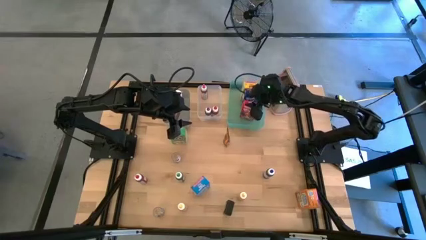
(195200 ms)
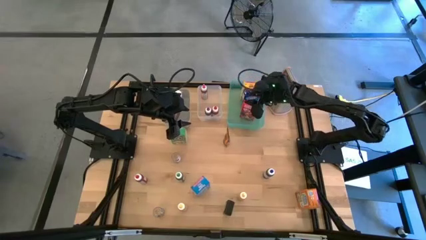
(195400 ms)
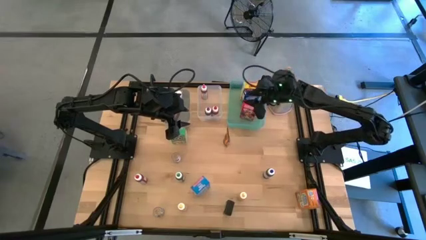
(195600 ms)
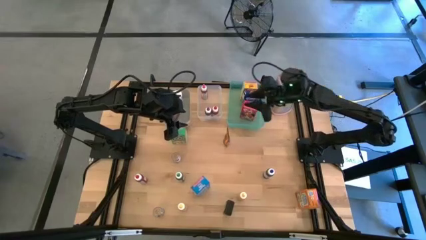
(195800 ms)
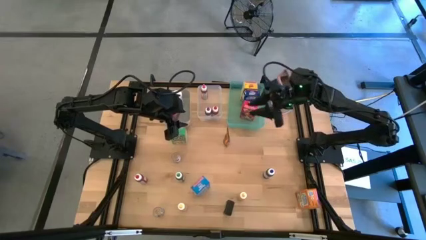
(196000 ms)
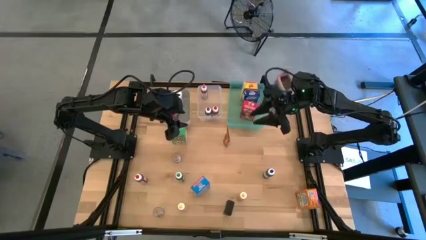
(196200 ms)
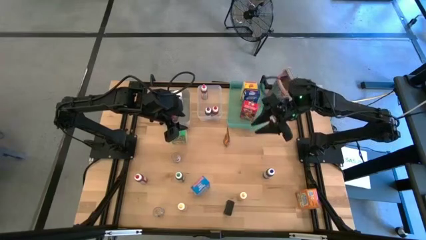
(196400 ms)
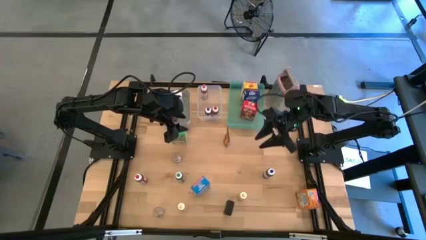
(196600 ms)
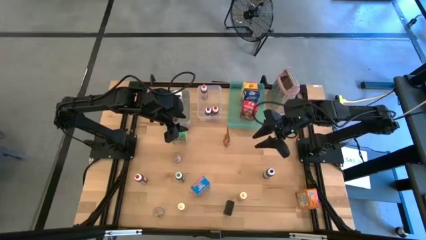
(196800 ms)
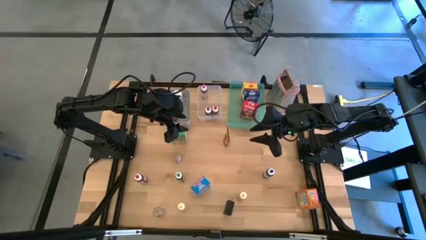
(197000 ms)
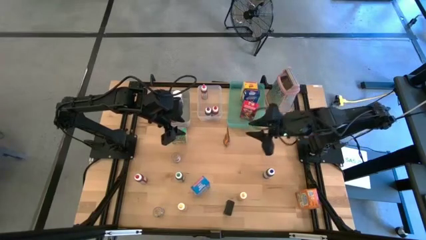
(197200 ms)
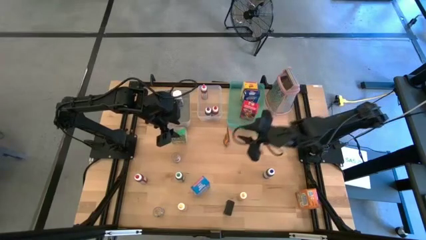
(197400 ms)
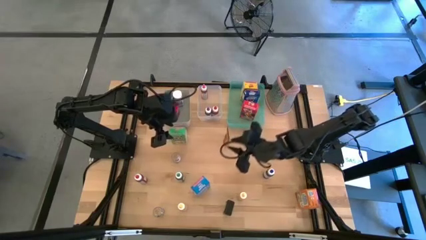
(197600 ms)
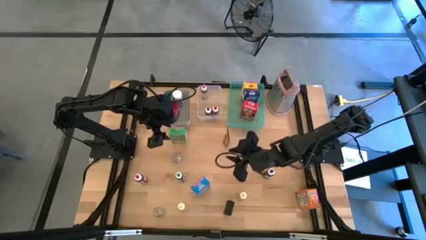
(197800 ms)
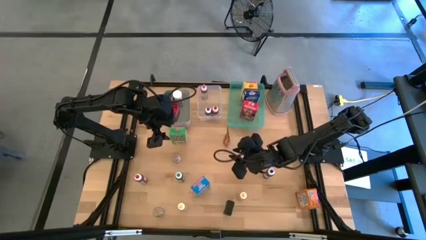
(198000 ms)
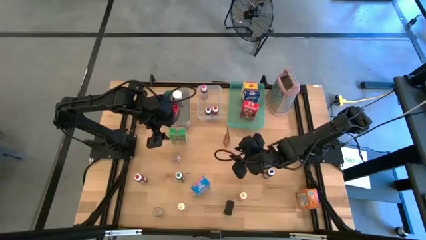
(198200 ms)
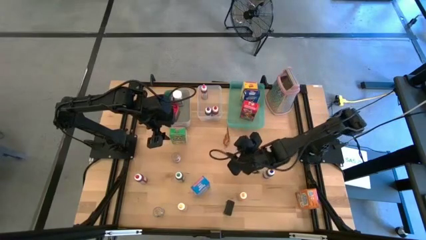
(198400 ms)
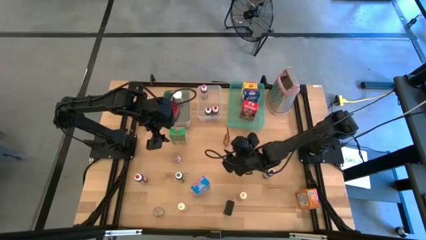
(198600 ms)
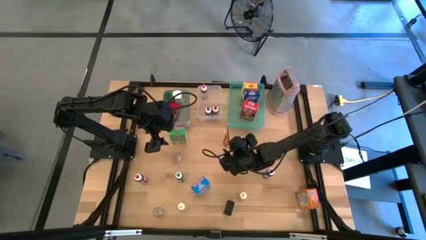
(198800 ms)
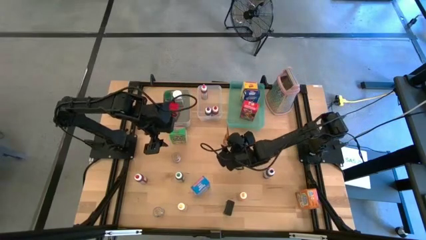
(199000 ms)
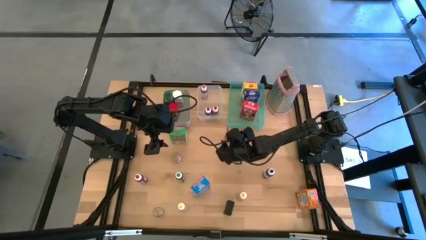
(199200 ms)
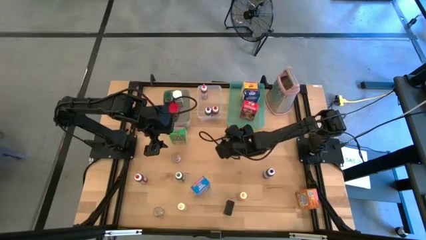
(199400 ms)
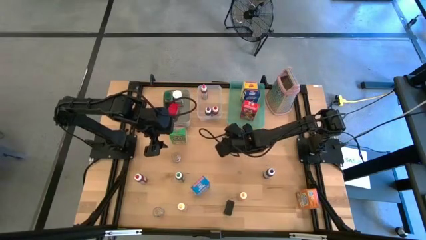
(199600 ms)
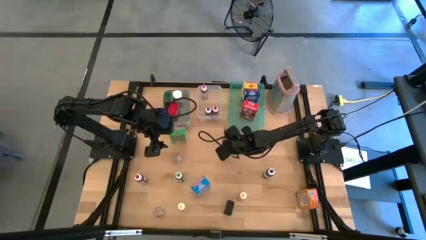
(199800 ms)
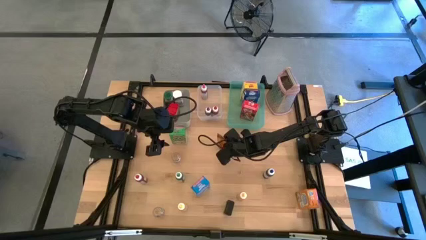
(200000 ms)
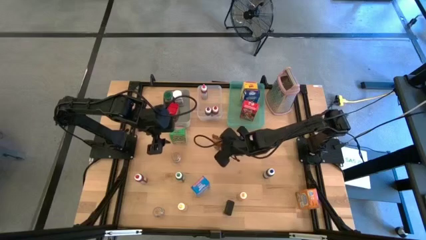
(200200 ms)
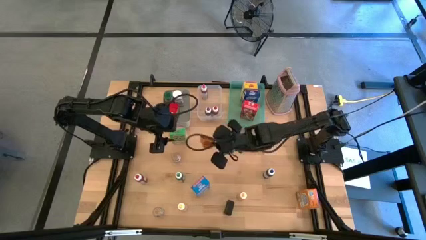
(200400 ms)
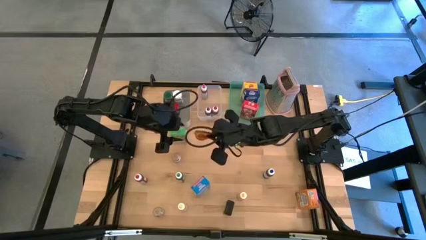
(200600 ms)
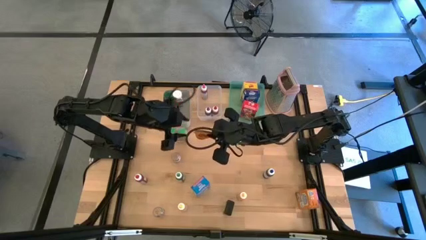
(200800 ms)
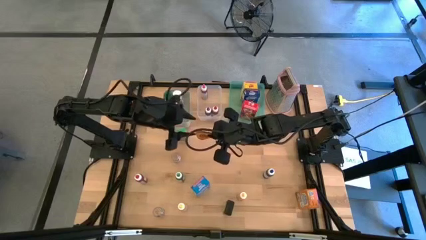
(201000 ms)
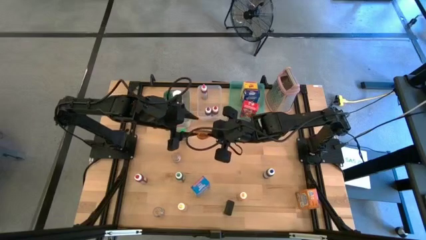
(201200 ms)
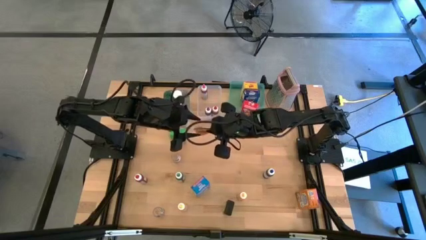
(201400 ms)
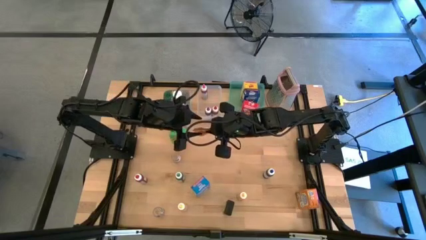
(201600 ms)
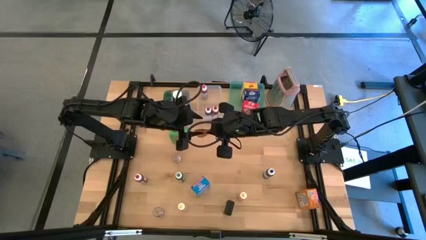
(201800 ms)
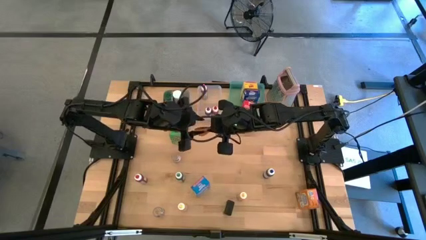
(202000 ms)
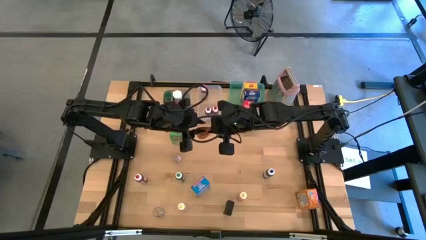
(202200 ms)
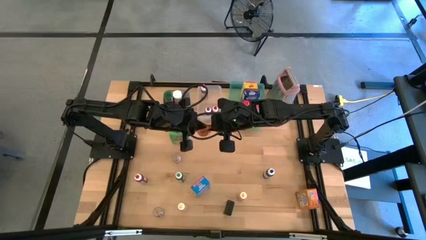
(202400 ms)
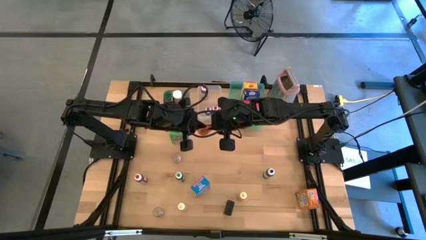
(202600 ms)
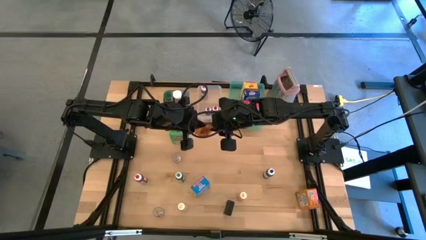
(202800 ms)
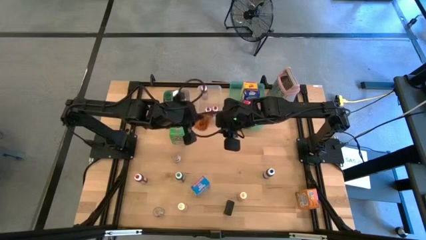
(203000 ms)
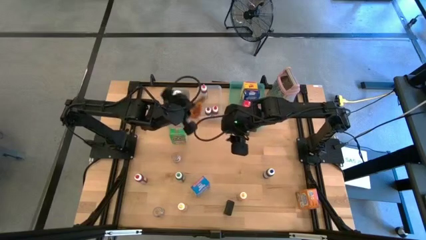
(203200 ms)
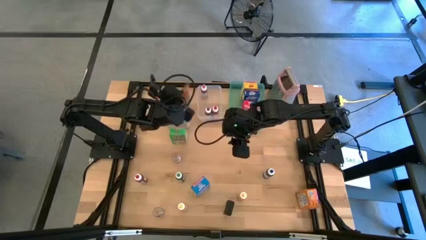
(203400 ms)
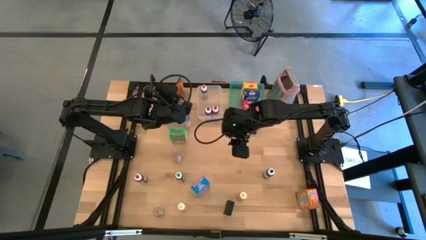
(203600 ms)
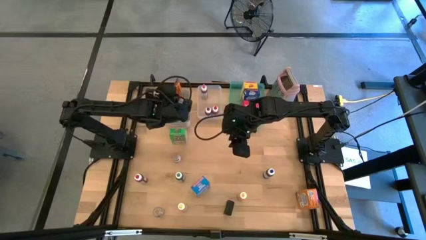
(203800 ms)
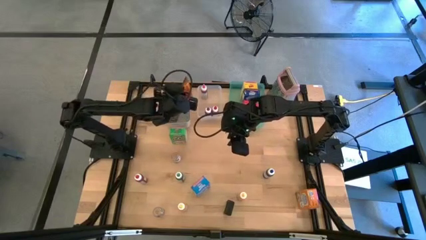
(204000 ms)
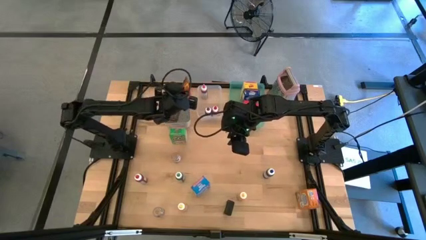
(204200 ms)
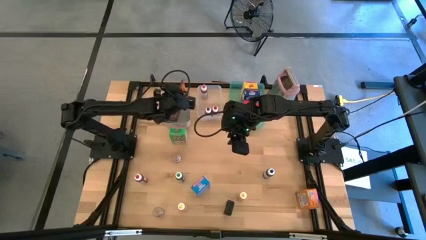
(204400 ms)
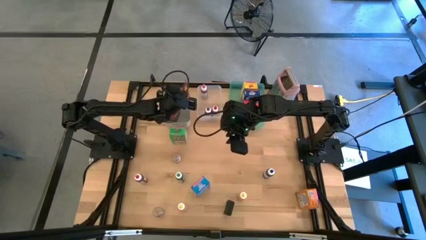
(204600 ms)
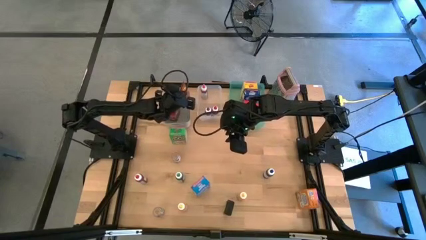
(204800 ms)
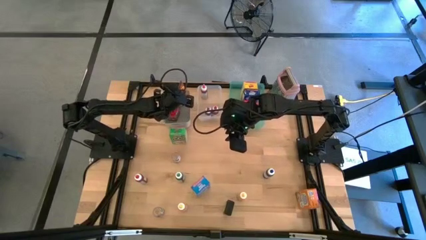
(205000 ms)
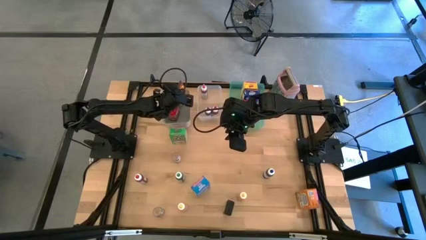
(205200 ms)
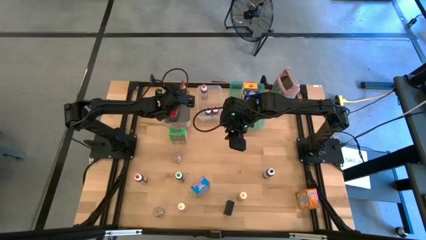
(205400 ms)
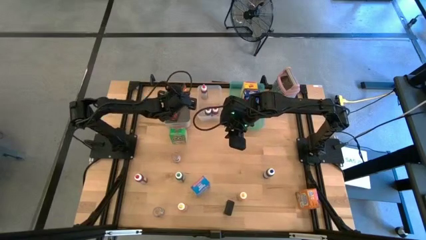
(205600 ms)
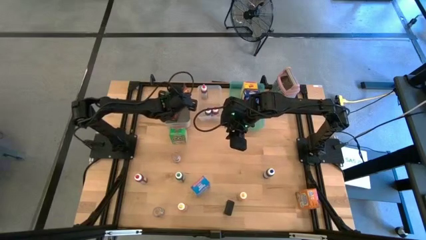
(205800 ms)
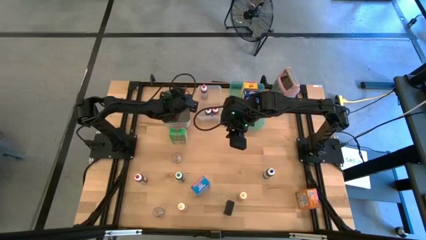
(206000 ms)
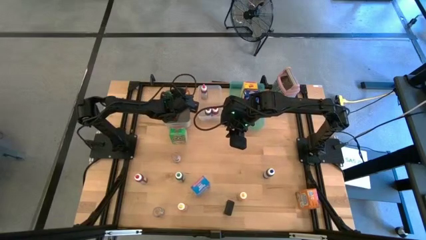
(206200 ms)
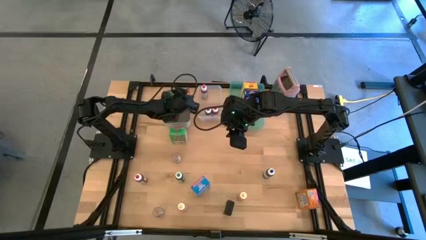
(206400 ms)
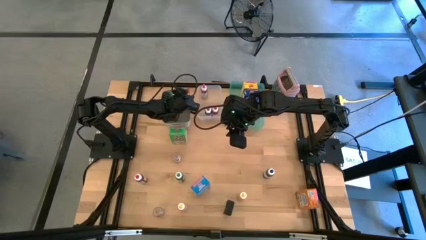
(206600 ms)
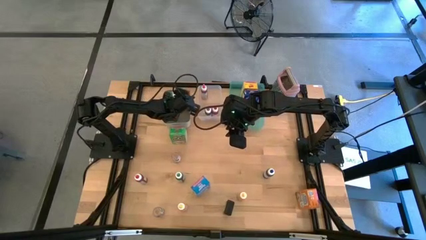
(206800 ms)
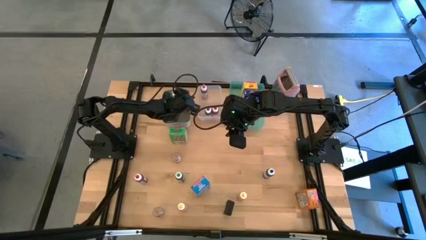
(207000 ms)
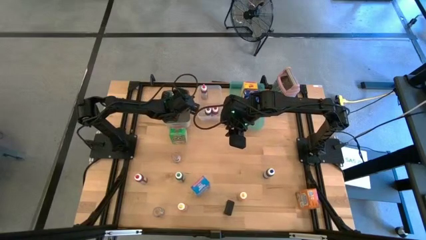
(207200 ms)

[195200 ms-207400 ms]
Task: Pick & Place Kitchen Items
Put the brown seasoning pack into the gray bin
